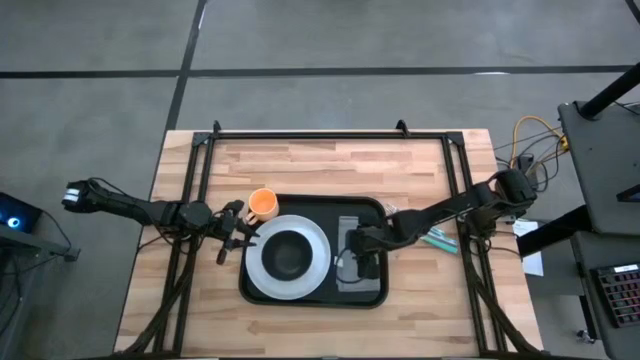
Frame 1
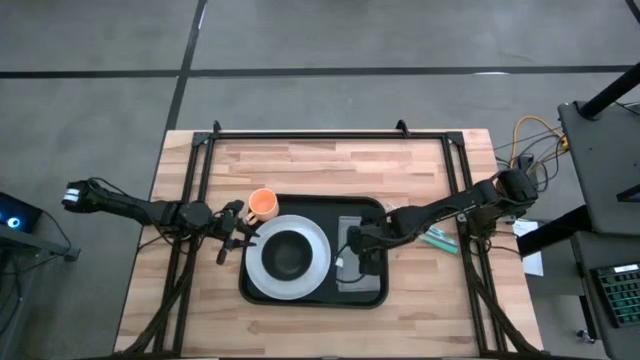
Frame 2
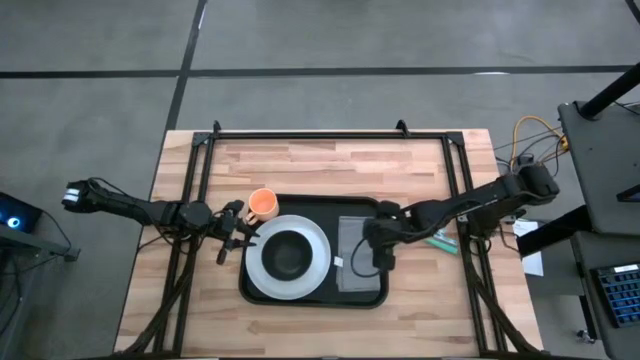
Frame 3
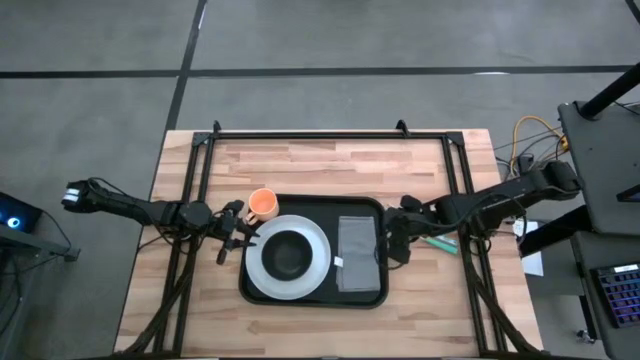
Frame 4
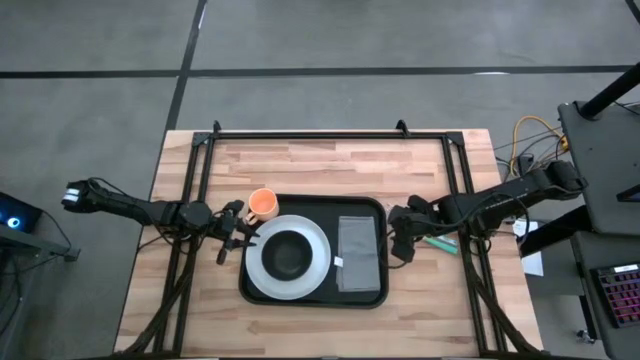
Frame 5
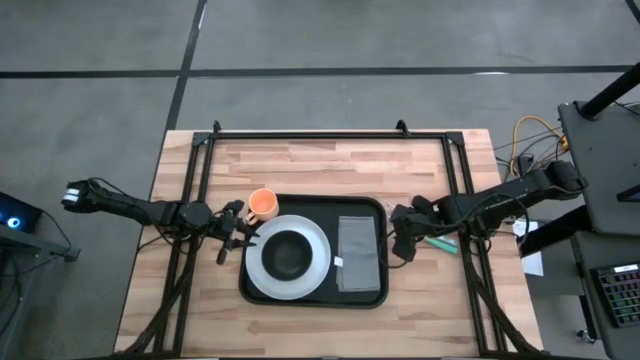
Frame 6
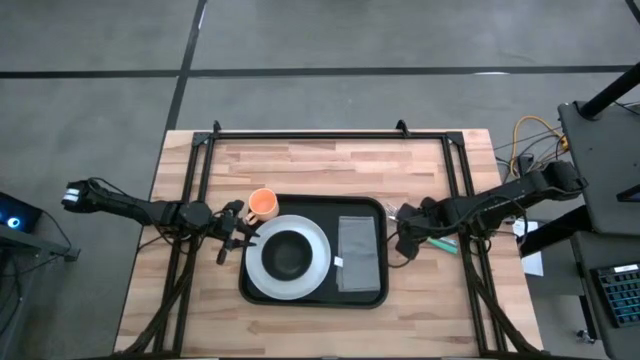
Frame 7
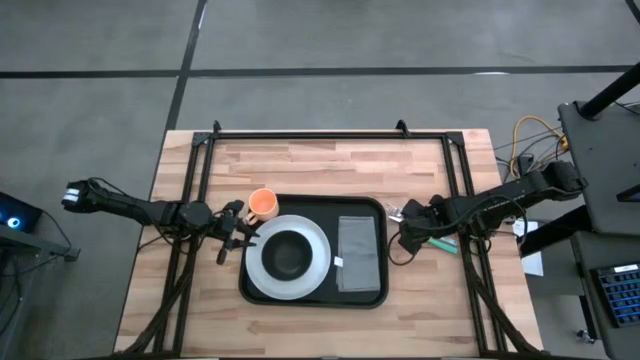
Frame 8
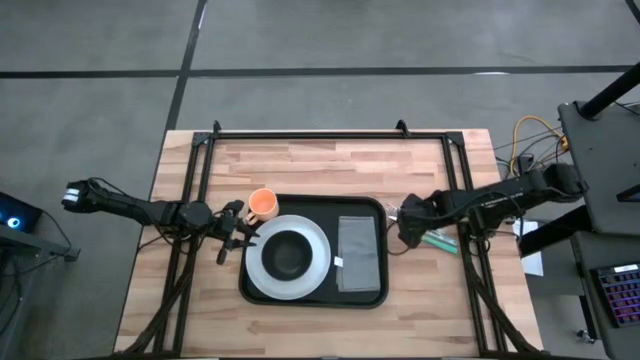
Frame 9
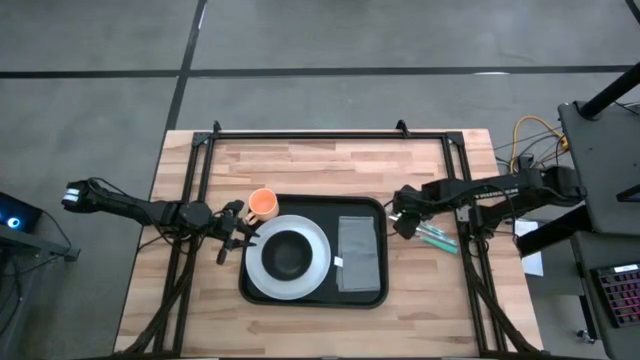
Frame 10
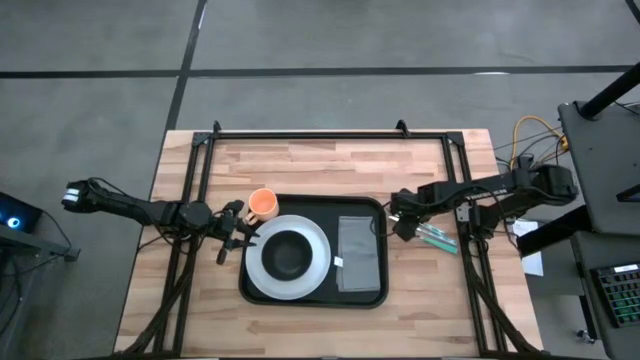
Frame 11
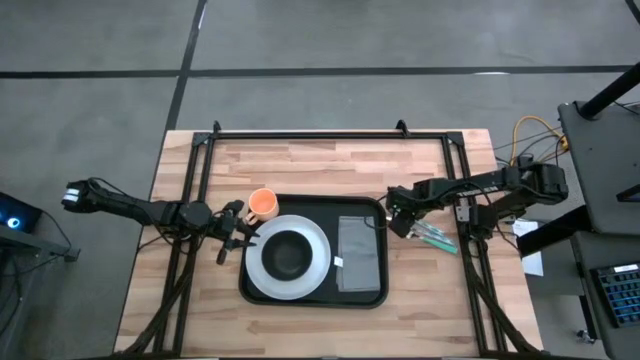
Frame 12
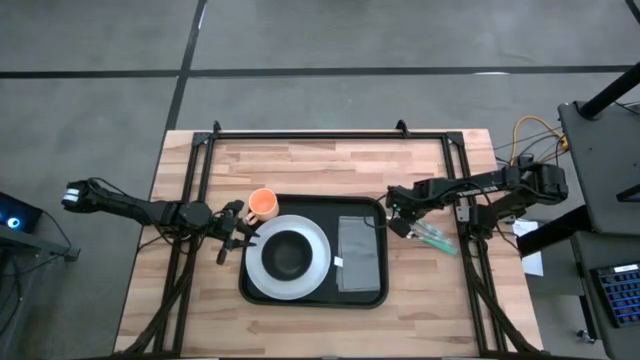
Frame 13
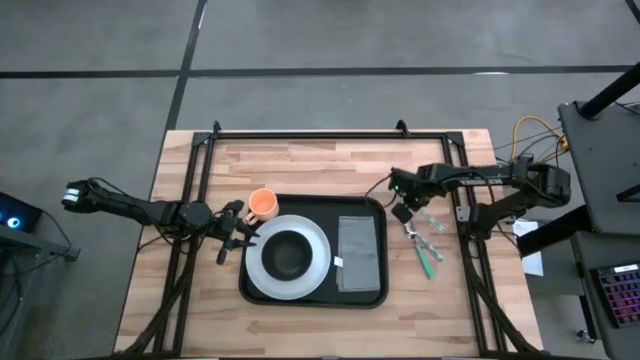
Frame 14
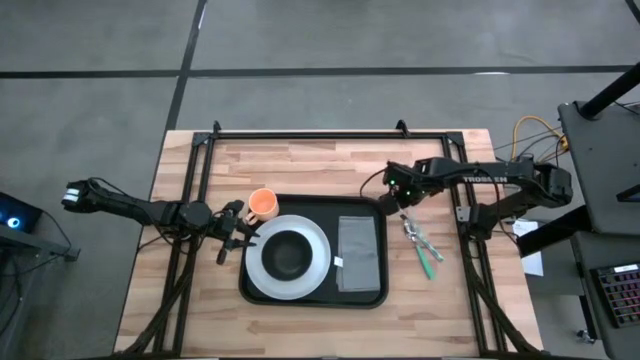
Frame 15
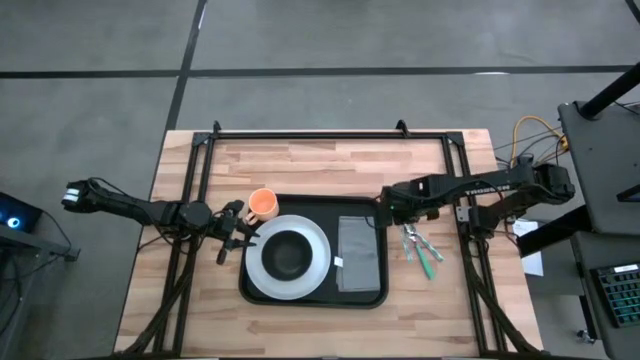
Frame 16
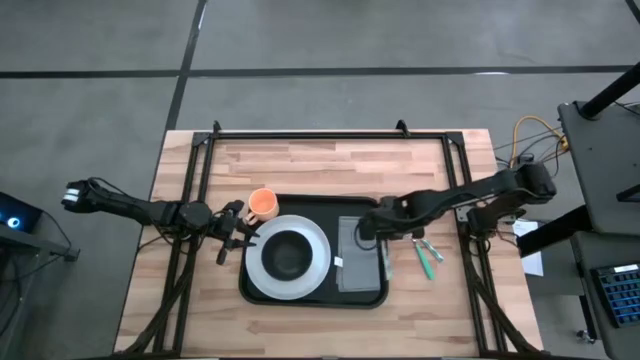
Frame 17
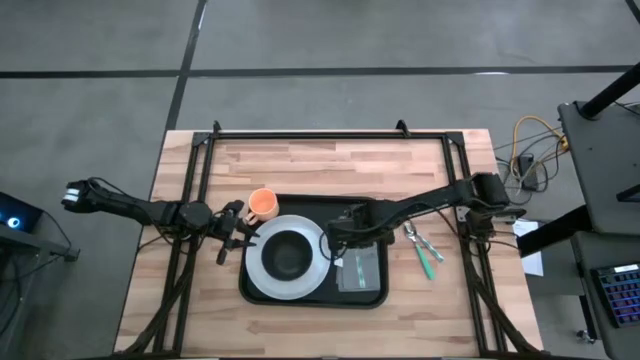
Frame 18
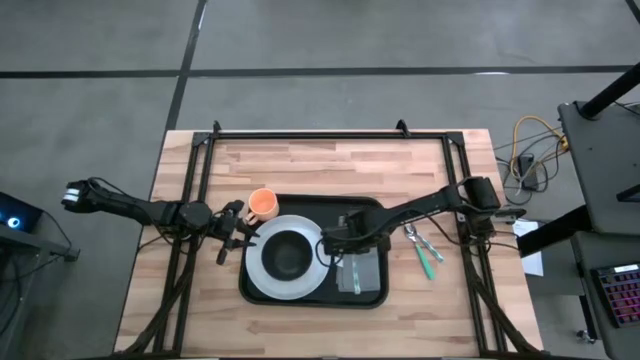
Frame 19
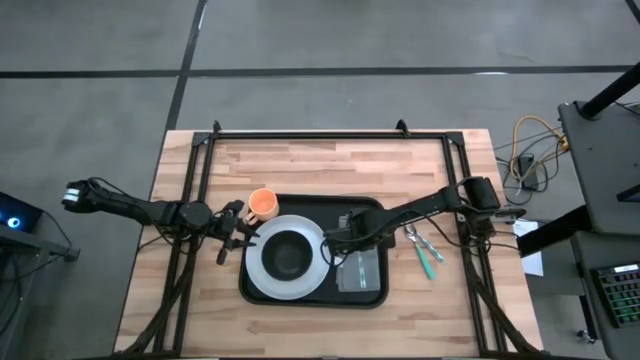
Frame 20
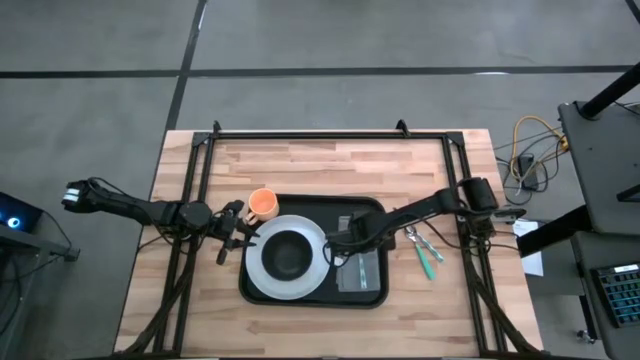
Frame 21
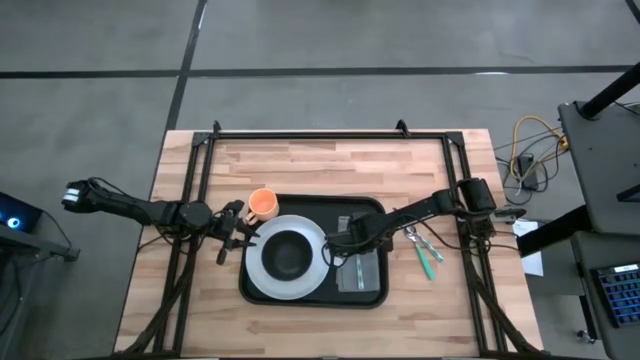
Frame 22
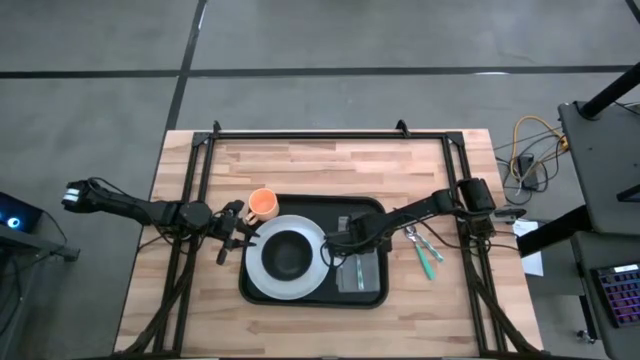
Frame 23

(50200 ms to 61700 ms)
Task: Set up tray
Put the blue patterned fork on top of the gray napkin to the right of the white plate

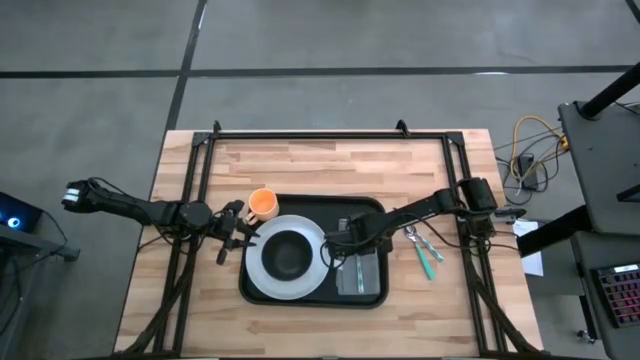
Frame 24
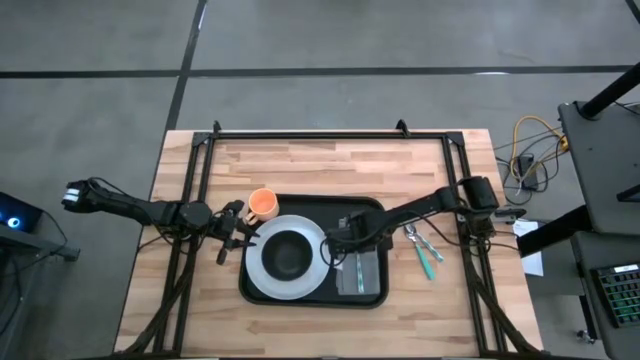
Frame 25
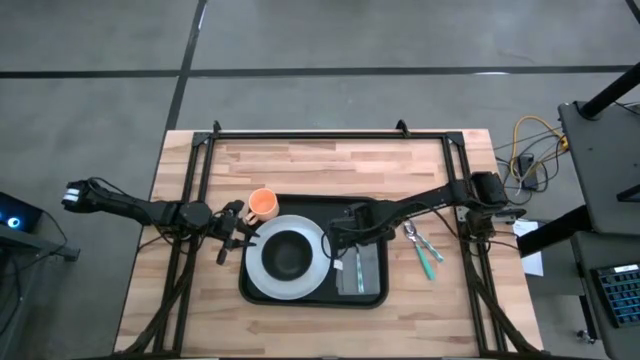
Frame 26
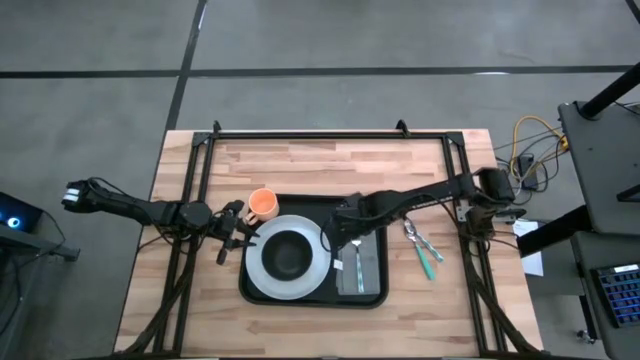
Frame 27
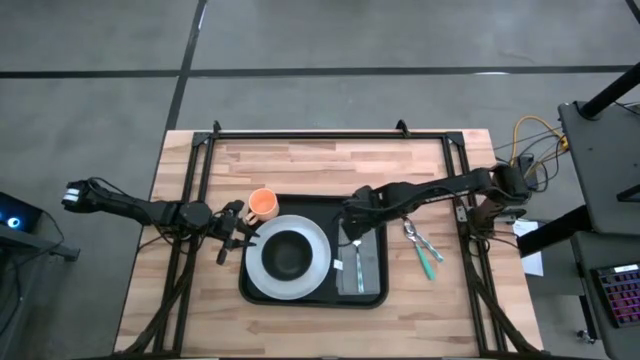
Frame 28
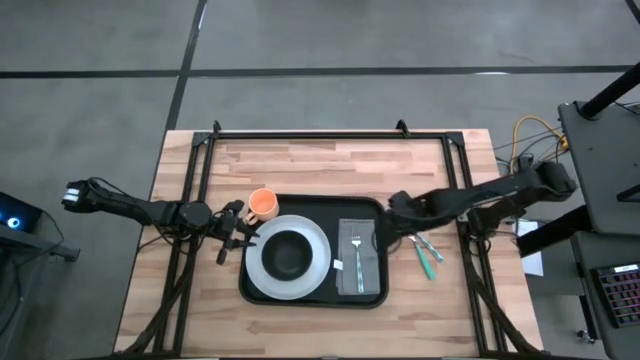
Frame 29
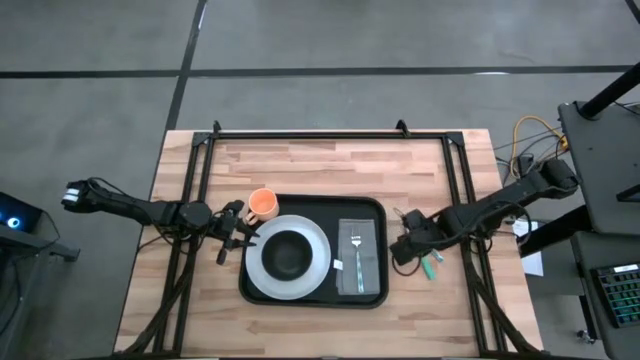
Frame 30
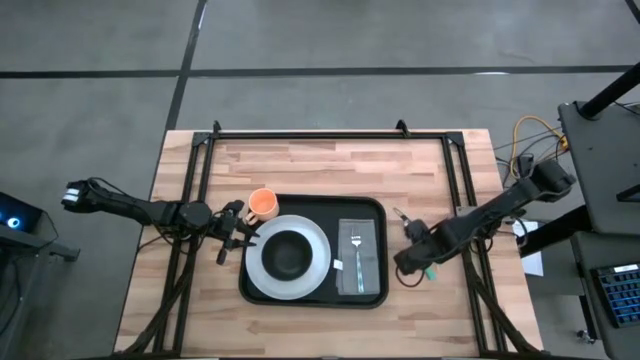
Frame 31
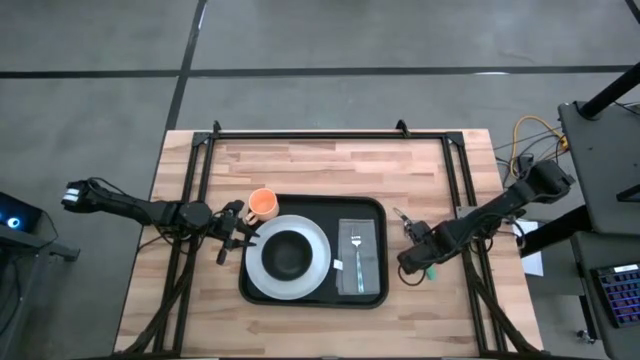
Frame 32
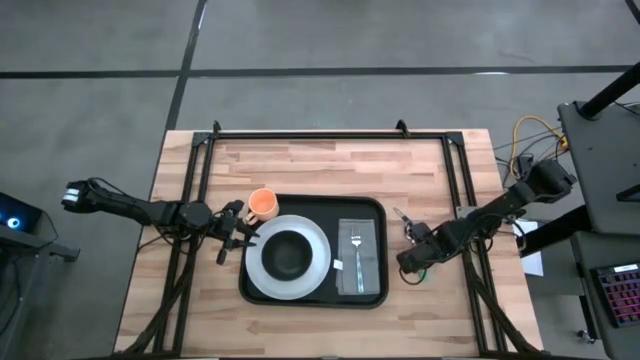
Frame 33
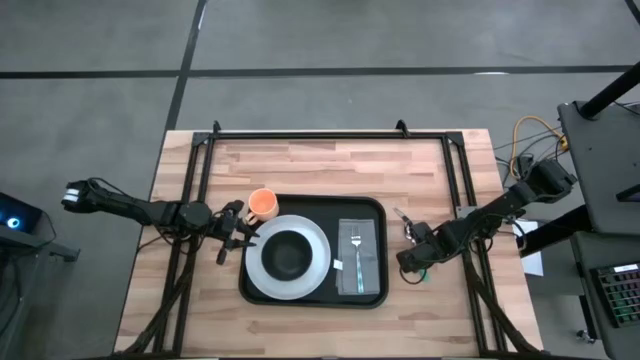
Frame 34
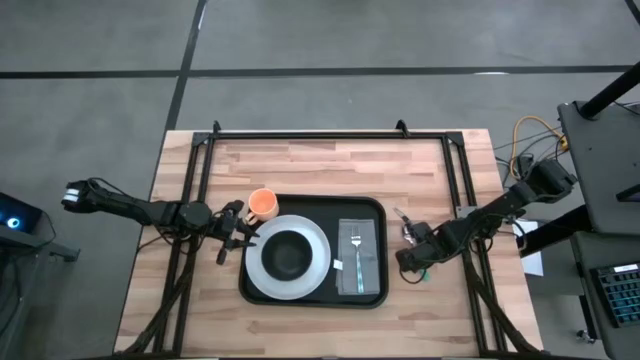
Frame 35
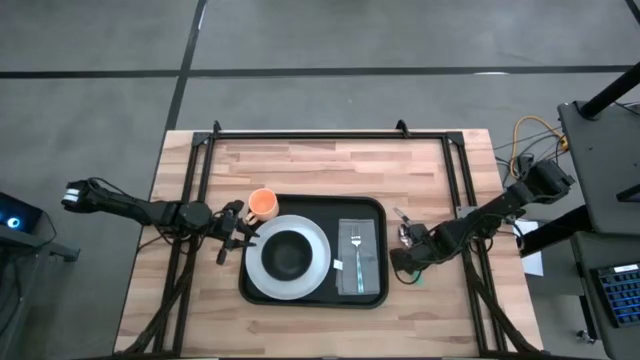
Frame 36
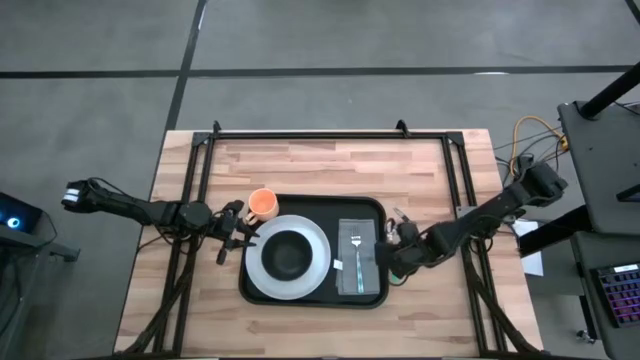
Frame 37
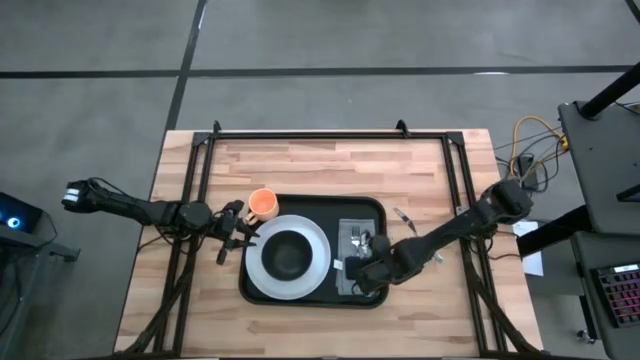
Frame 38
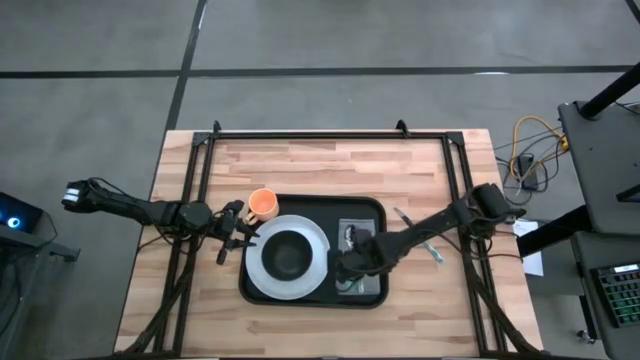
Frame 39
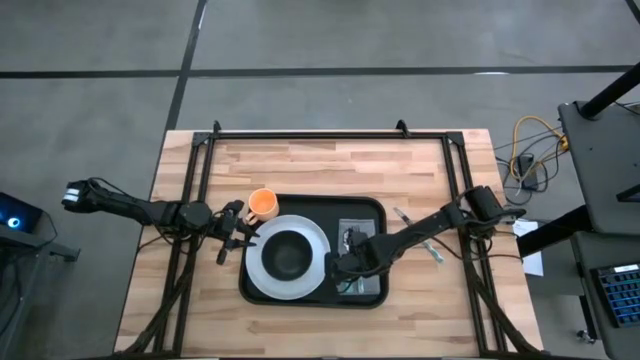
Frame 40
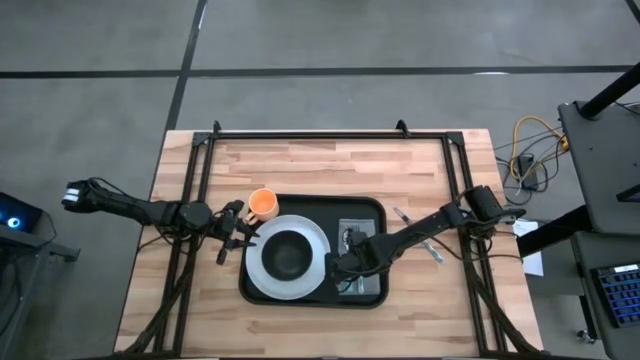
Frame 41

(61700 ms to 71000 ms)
Put the blue spoon on top of the gray napkin to the right of the white plate

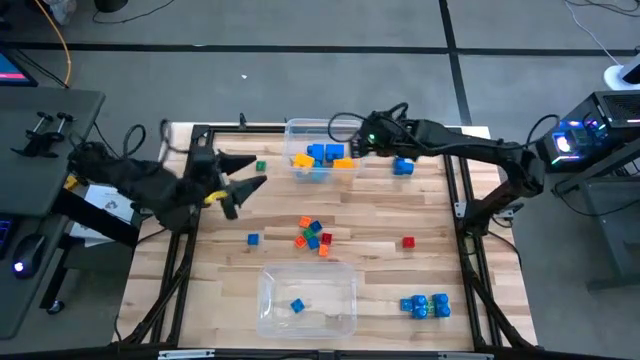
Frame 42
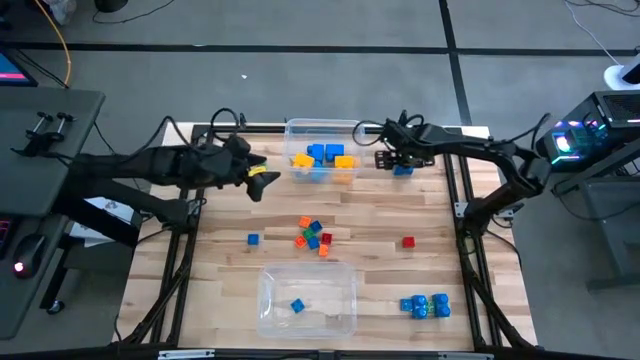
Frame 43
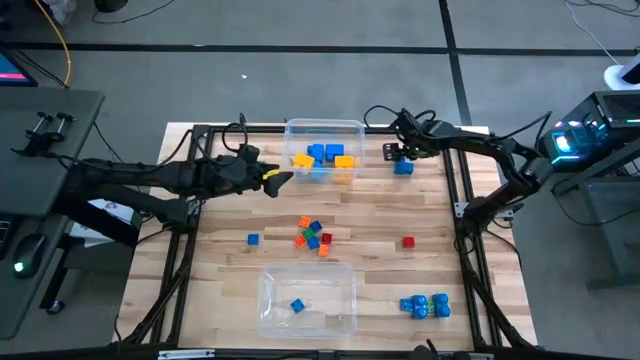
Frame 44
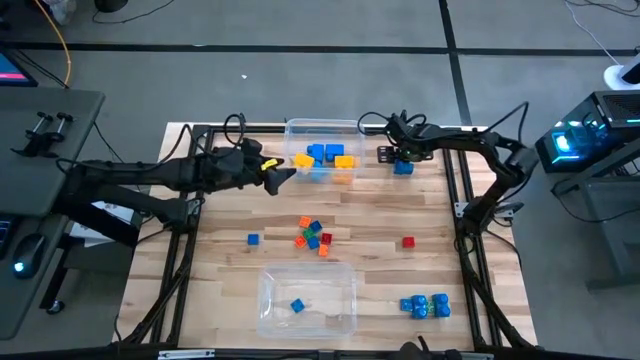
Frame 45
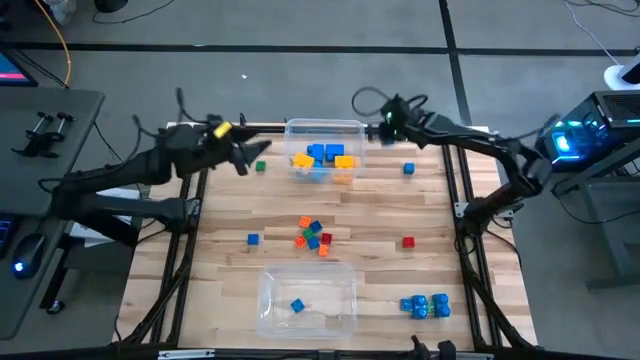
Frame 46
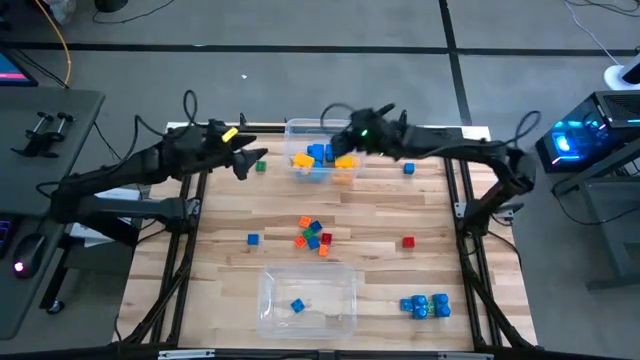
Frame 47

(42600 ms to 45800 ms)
Task: Sort blocks by size
Put the large blue game piece into the top transparent bin
